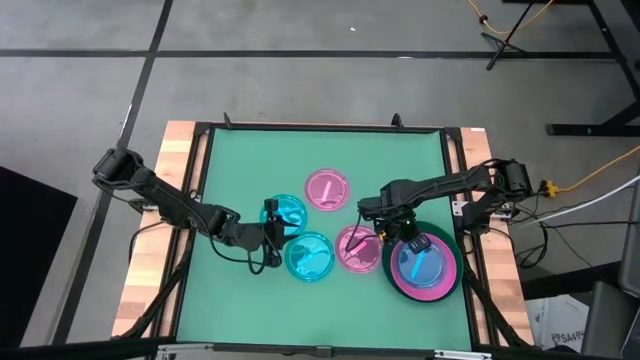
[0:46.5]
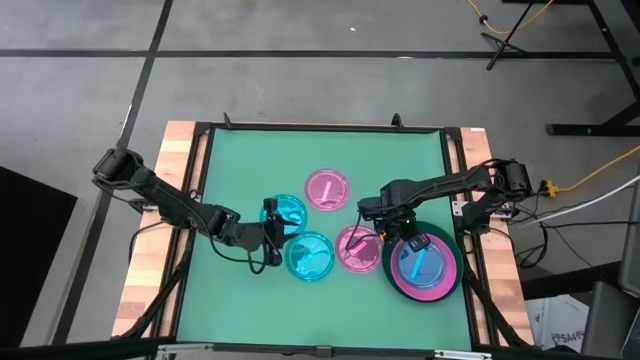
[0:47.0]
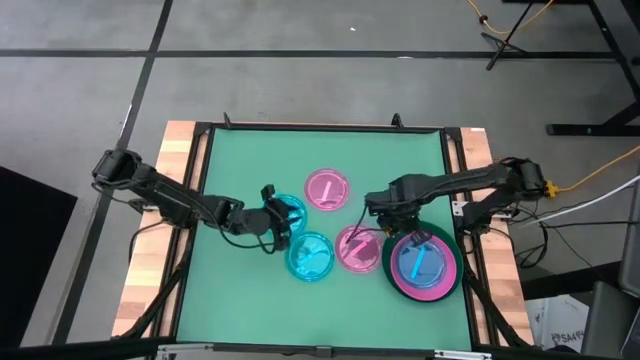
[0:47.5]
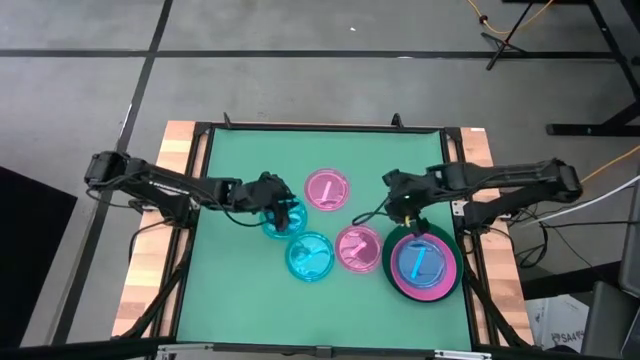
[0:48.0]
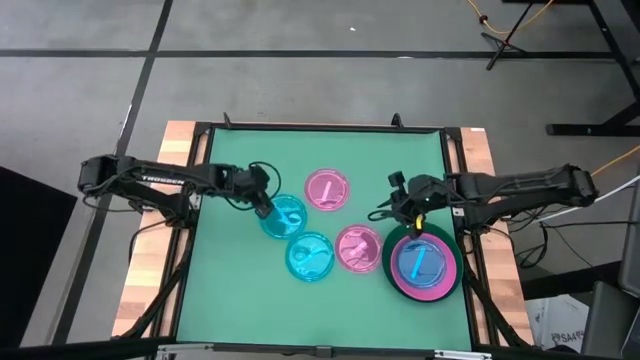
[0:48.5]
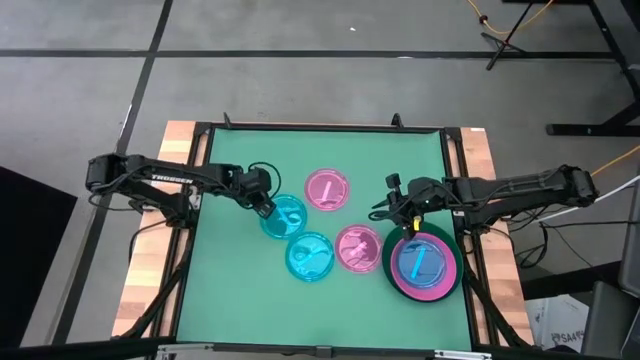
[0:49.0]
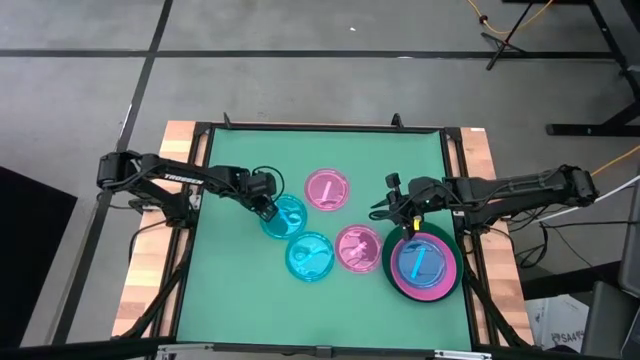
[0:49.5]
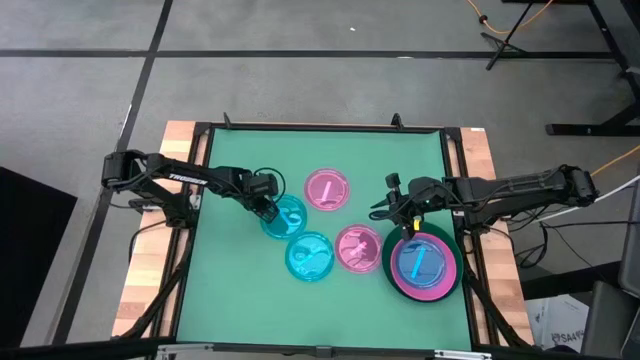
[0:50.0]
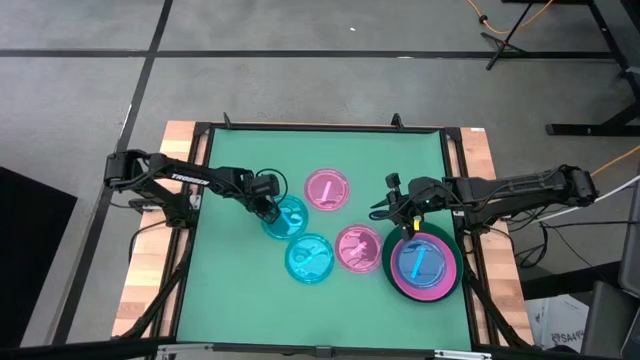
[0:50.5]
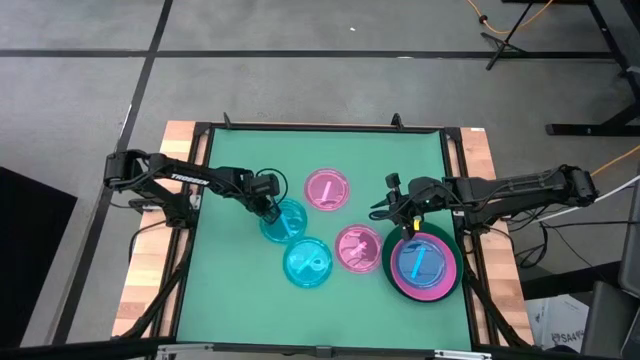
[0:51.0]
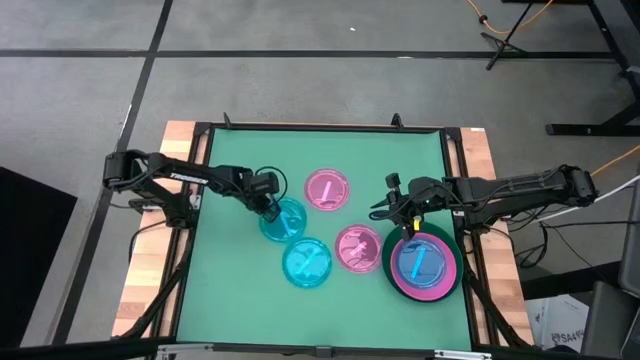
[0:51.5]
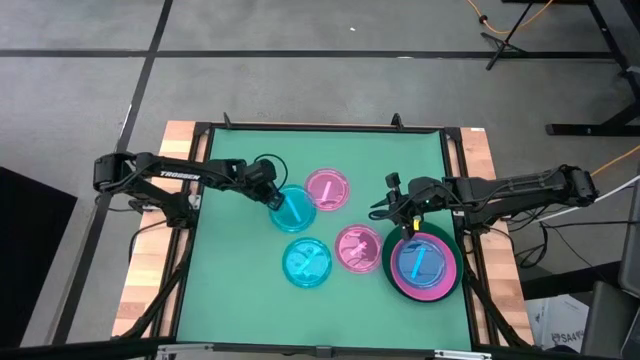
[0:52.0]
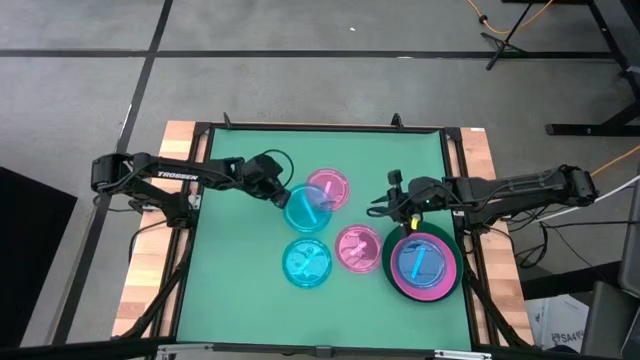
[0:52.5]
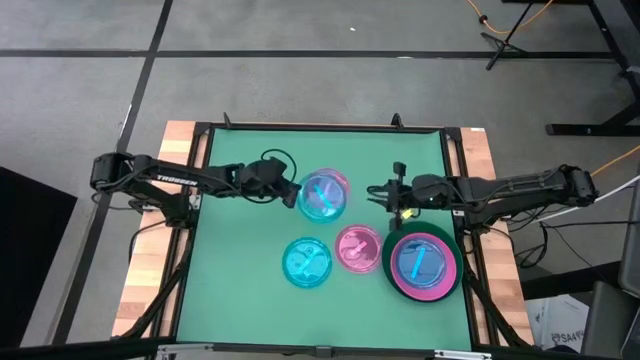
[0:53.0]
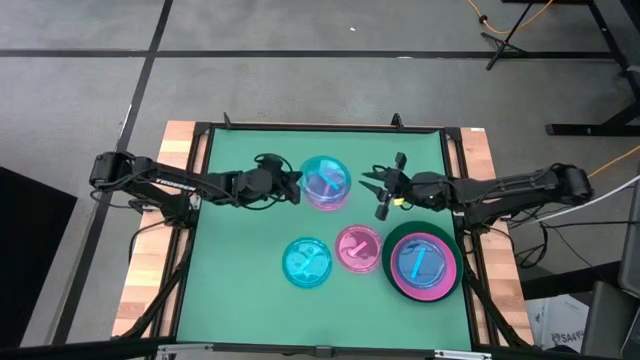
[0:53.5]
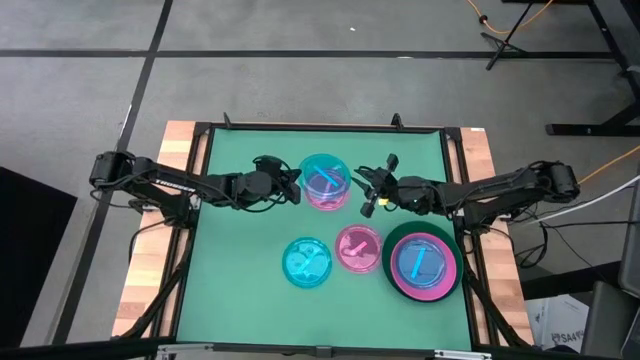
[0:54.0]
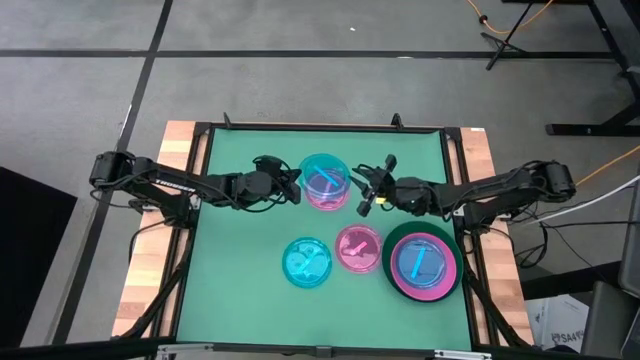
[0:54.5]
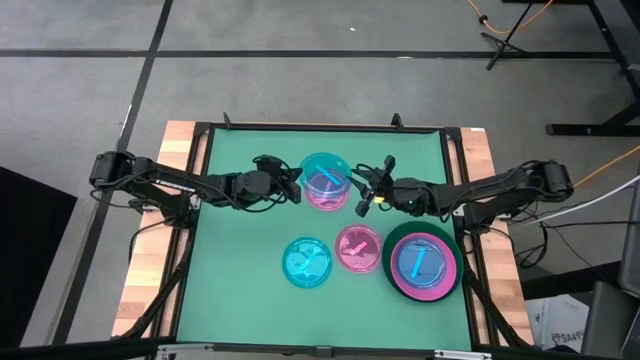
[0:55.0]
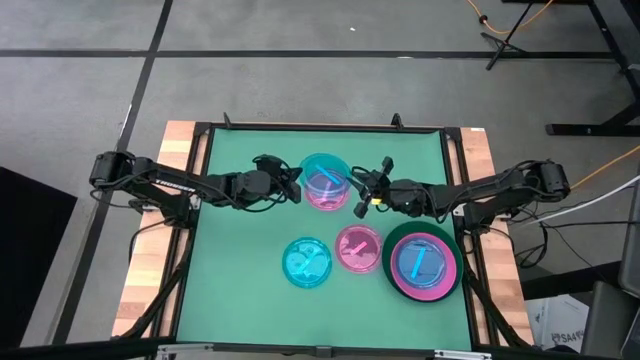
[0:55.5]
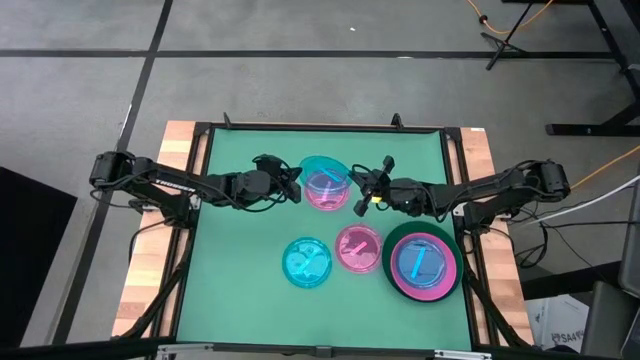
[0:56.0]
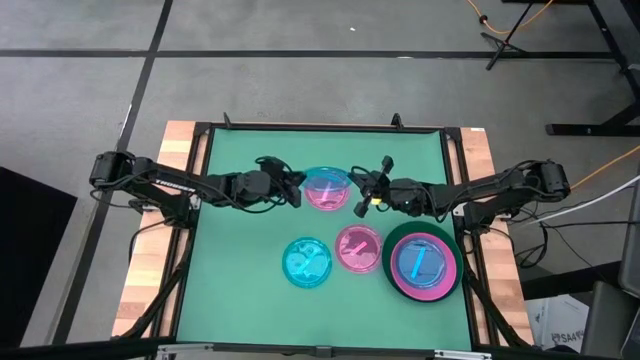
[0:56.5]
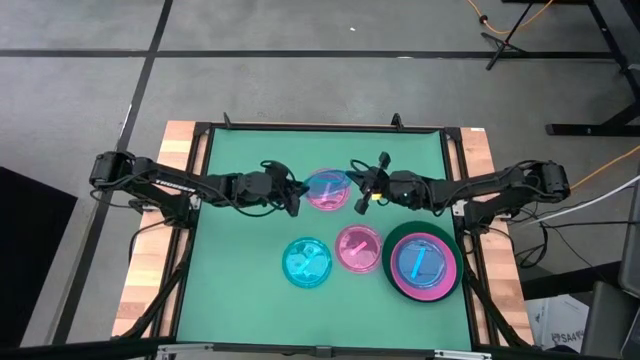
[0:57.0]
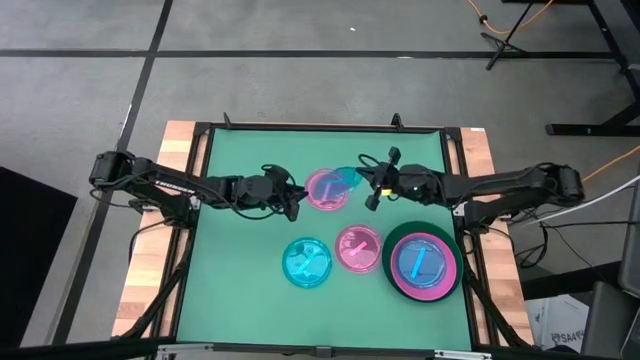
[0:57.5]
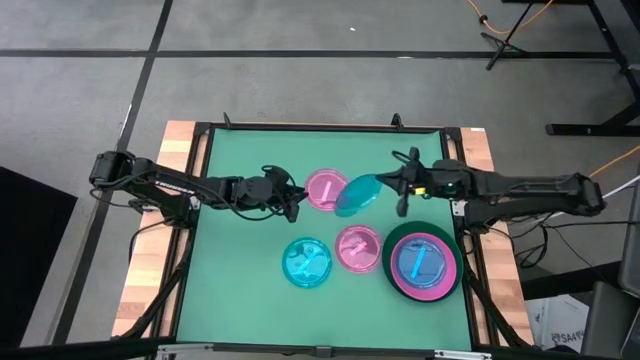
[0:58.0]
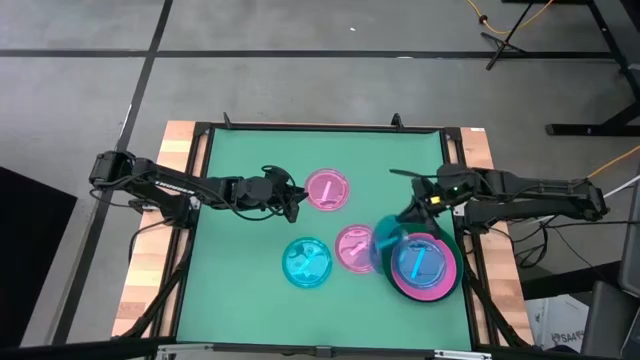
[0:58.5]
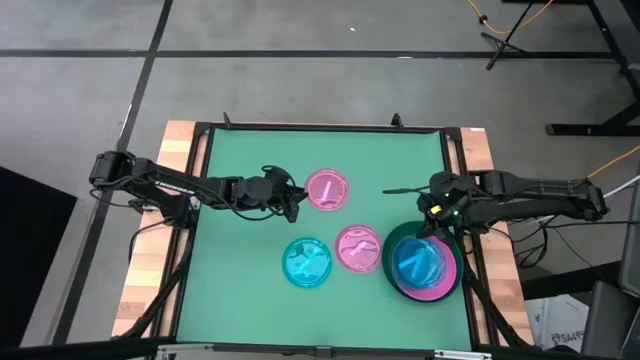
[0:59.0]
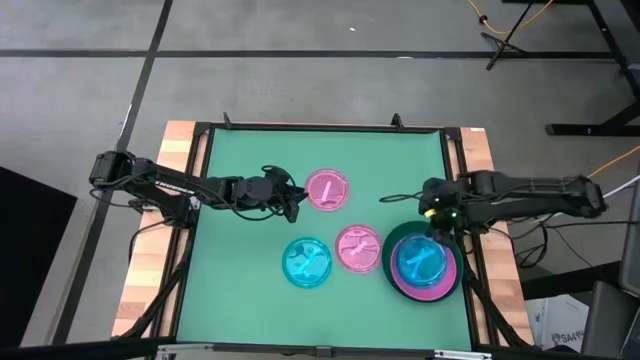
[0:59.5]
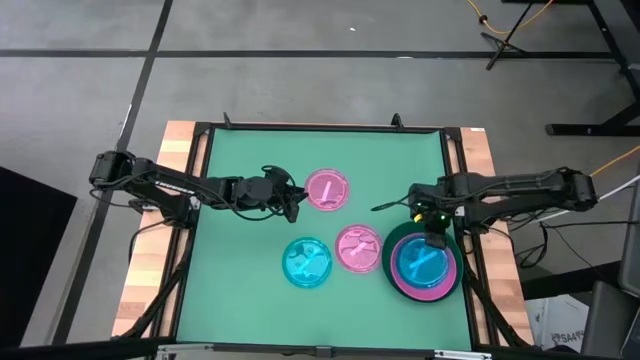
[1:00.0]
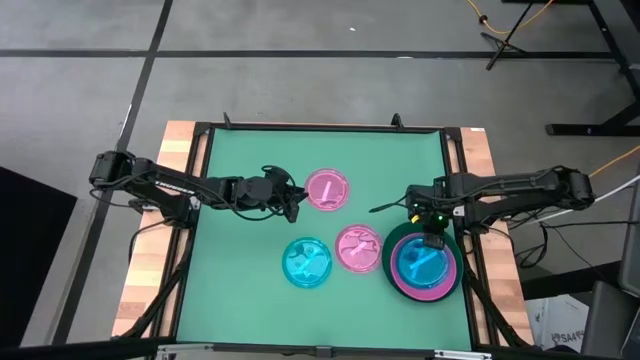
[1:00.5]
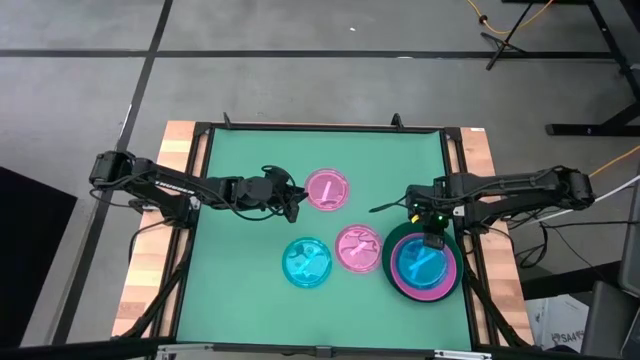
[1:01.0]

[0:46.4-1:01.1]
Task: Stack plastic plates
Stack the top transparent blue plate on top of the transparent blue plate

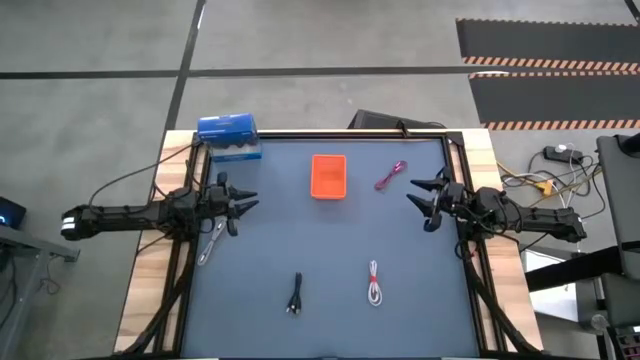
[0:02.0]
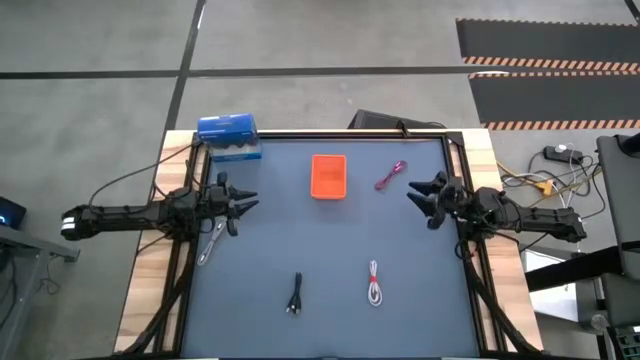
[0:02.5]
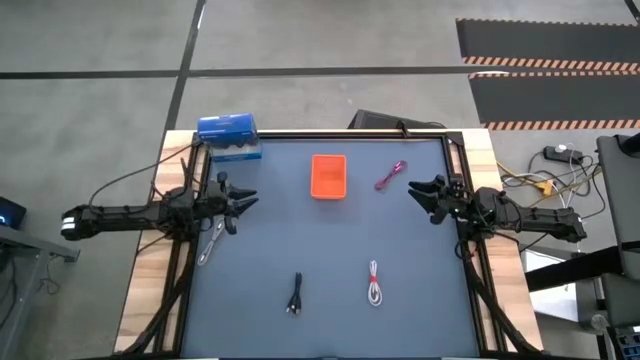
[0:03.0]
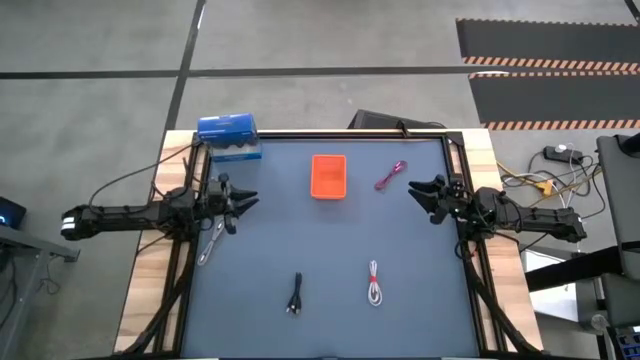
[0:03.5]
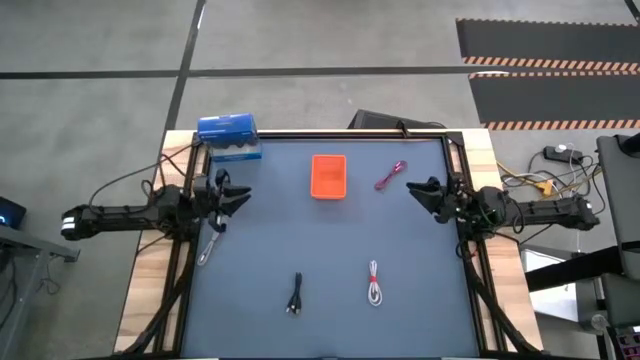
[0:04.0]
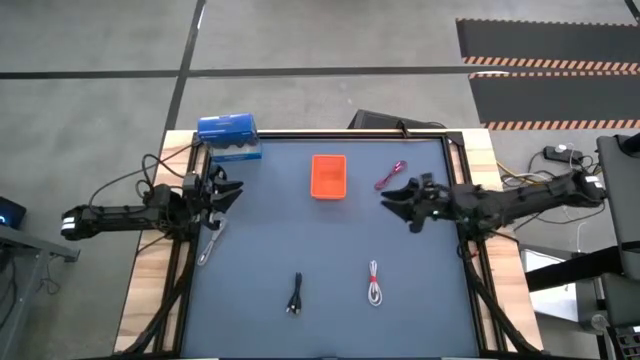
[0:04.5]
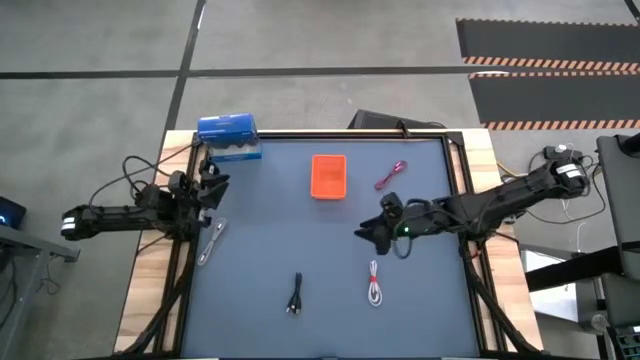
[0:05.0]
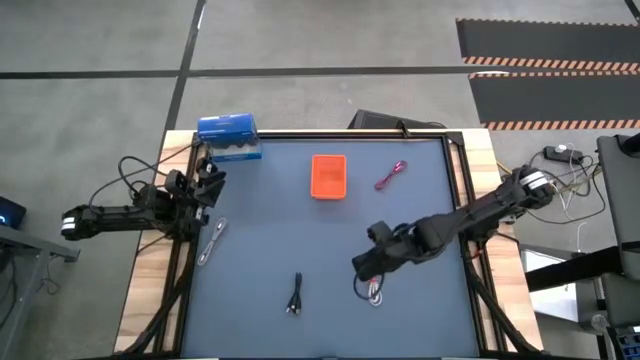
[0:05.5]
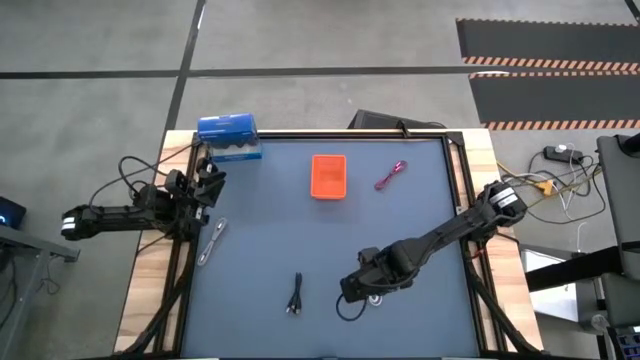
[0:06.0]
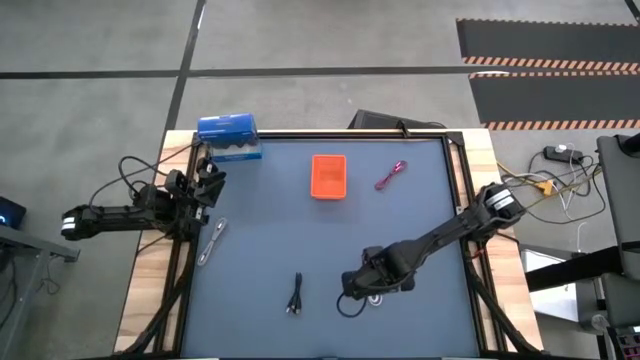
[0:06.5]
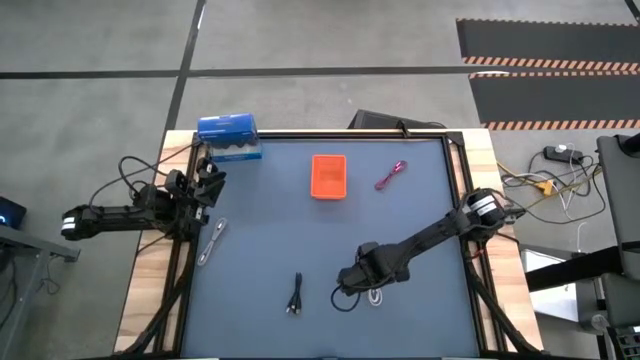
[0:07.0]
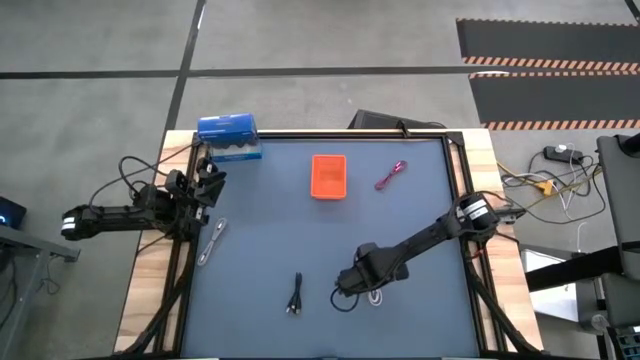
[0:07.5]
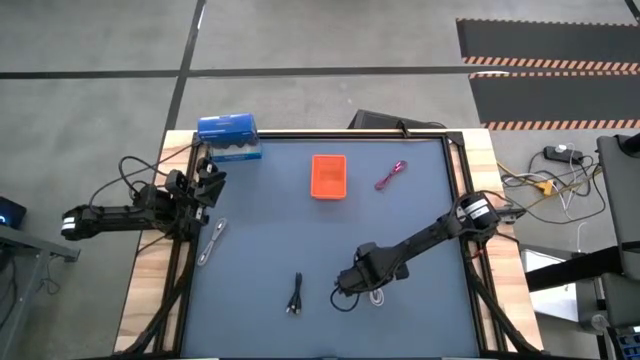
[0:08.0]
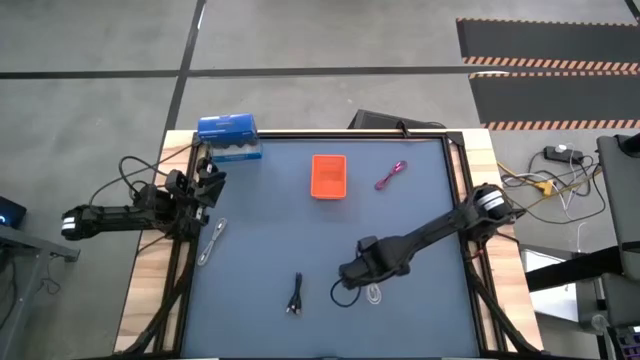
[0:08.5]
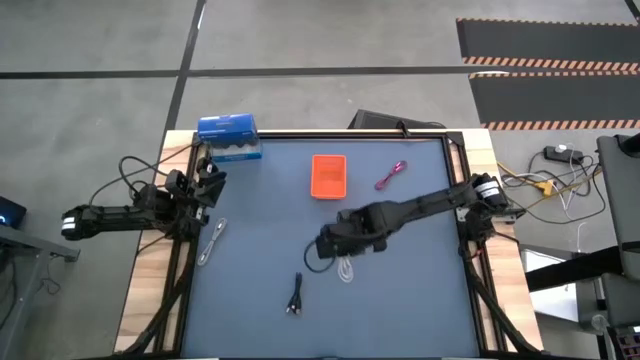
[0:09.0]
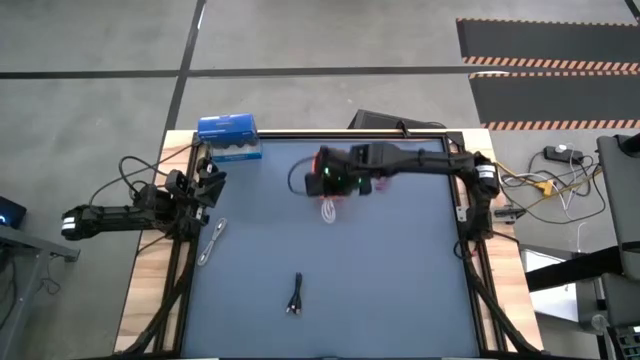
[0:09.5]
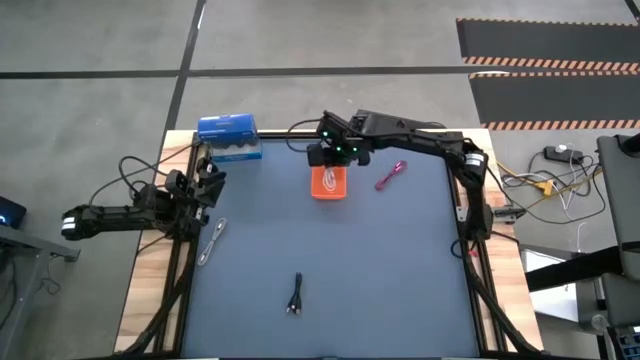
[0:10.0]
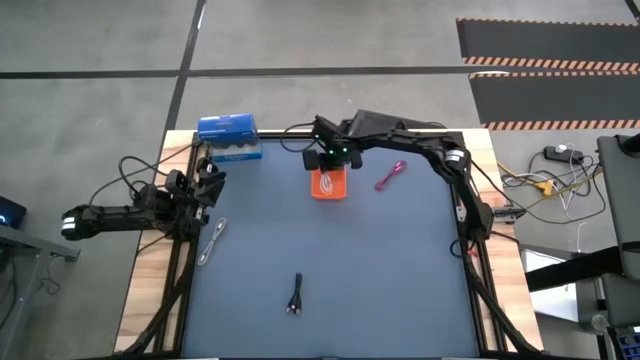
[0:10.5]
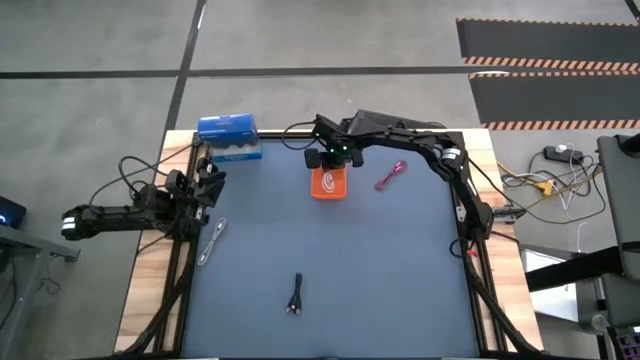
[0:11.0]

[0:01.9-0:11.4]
Task: Pick and place USB-C Cables
Put the white charger cable into the orange bin
